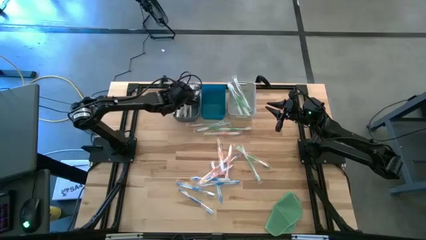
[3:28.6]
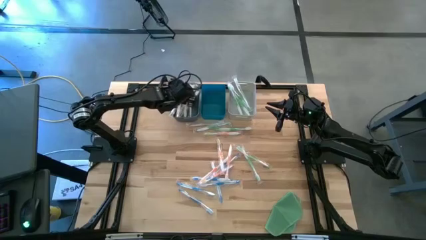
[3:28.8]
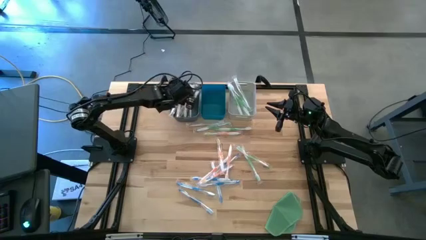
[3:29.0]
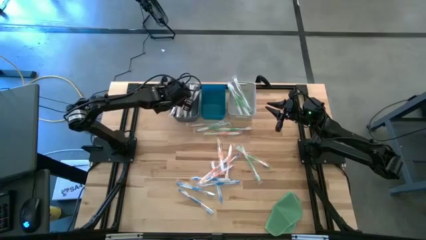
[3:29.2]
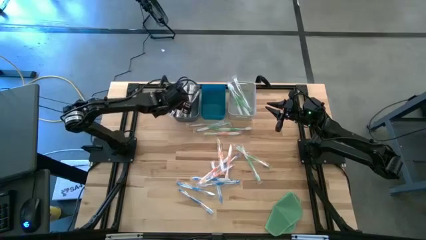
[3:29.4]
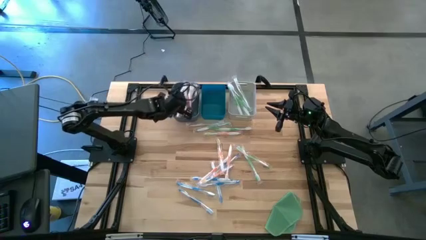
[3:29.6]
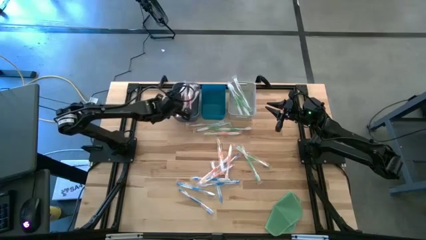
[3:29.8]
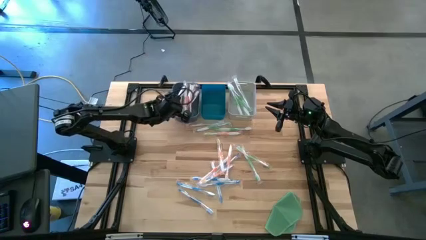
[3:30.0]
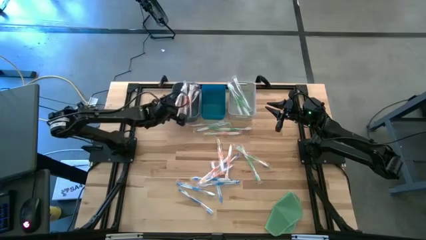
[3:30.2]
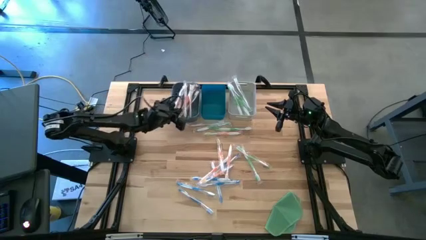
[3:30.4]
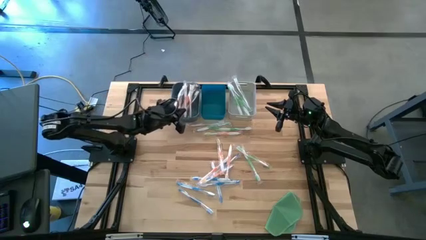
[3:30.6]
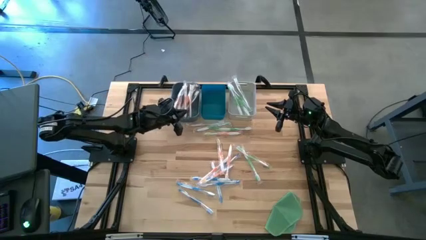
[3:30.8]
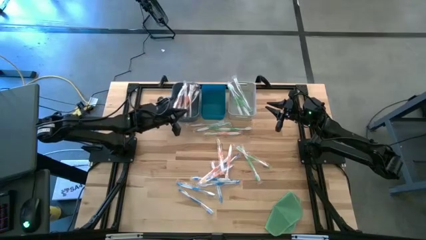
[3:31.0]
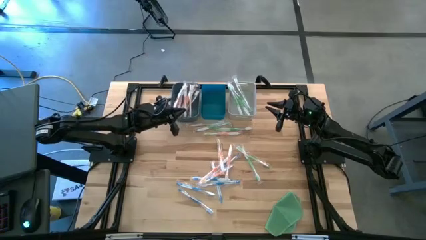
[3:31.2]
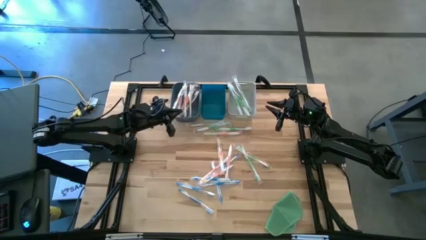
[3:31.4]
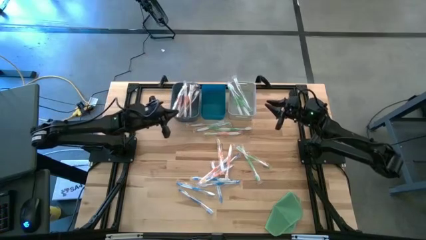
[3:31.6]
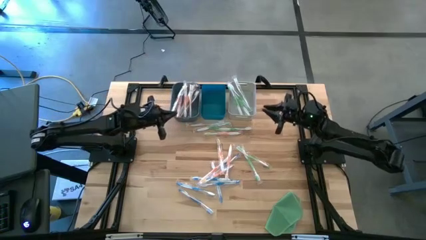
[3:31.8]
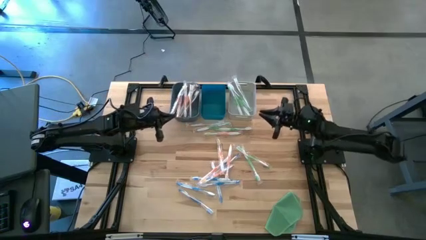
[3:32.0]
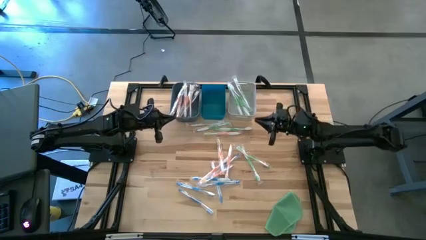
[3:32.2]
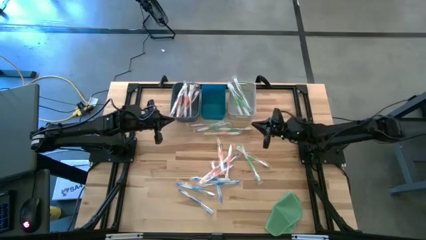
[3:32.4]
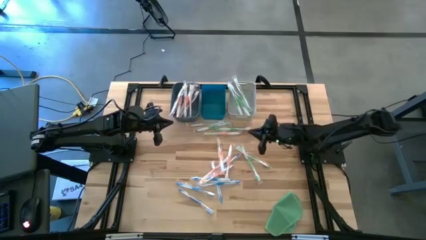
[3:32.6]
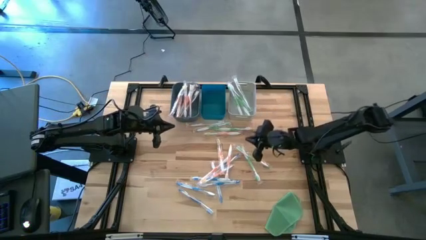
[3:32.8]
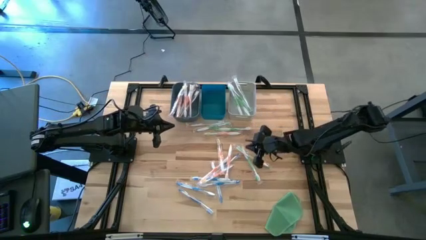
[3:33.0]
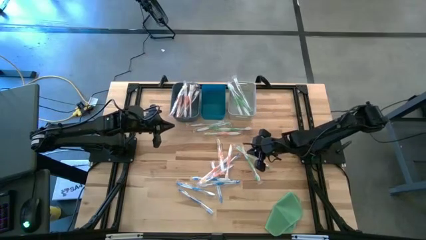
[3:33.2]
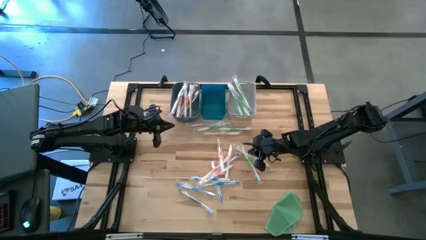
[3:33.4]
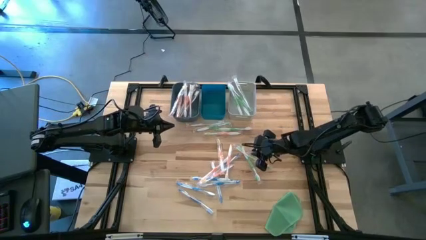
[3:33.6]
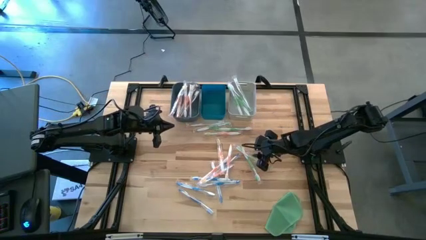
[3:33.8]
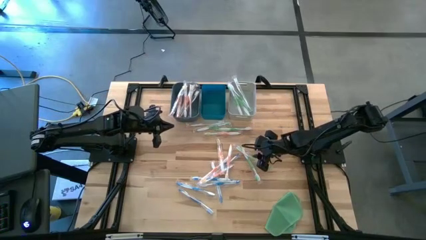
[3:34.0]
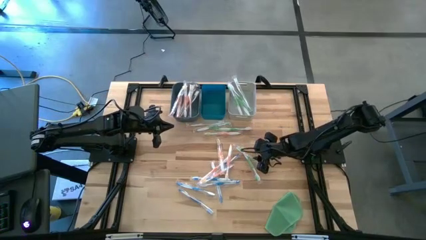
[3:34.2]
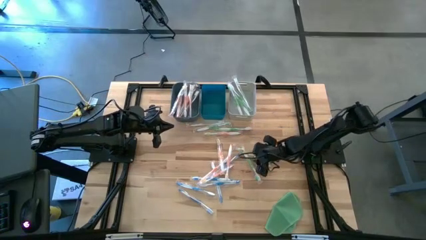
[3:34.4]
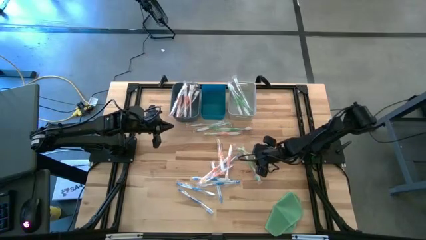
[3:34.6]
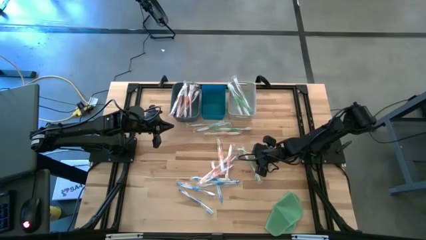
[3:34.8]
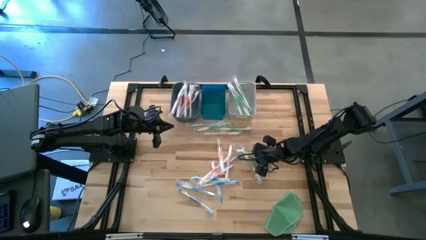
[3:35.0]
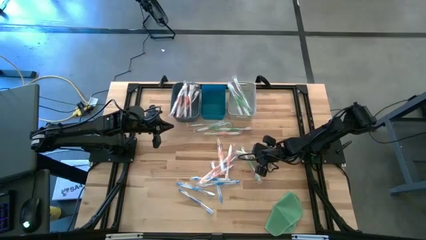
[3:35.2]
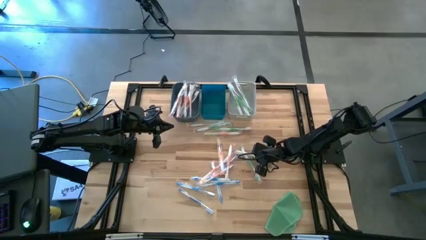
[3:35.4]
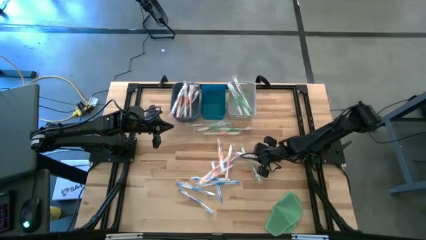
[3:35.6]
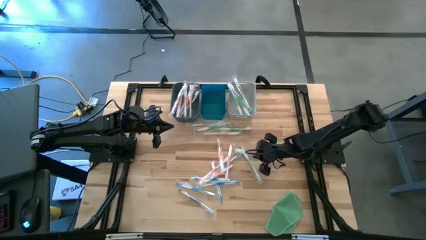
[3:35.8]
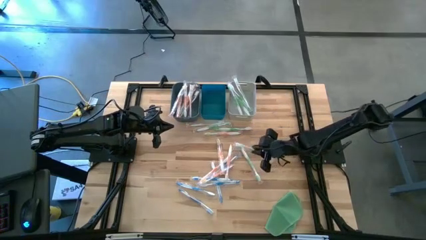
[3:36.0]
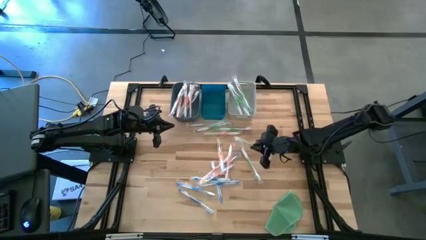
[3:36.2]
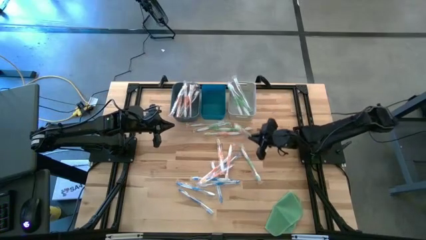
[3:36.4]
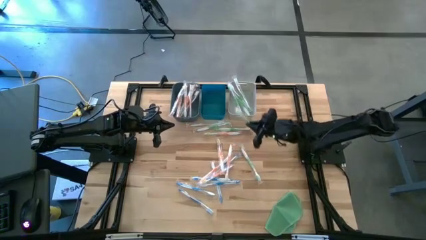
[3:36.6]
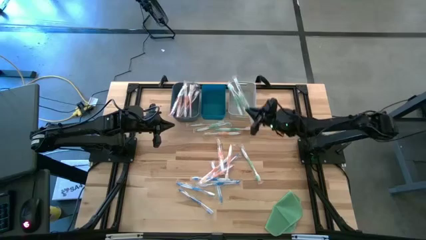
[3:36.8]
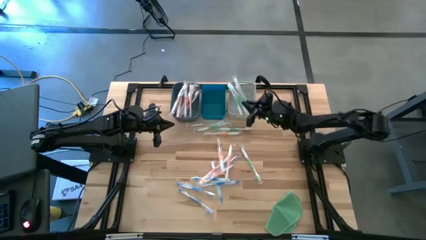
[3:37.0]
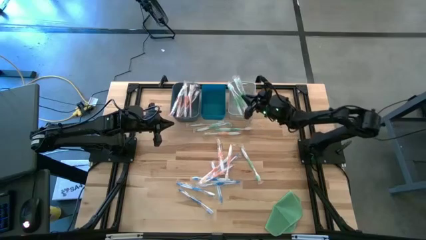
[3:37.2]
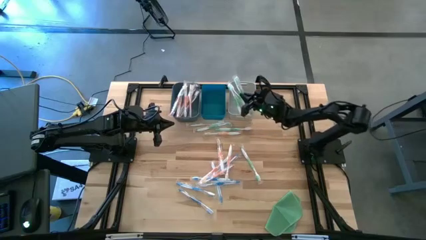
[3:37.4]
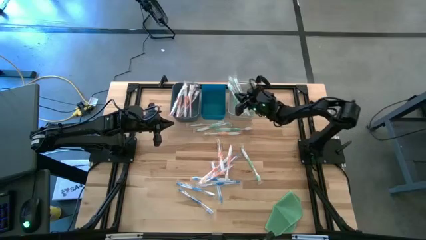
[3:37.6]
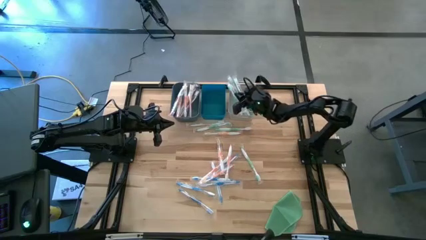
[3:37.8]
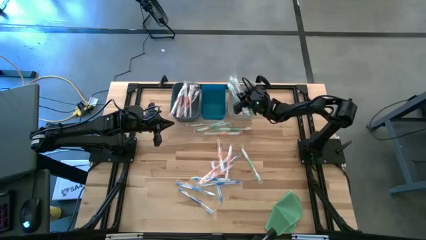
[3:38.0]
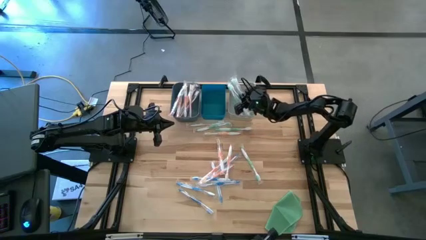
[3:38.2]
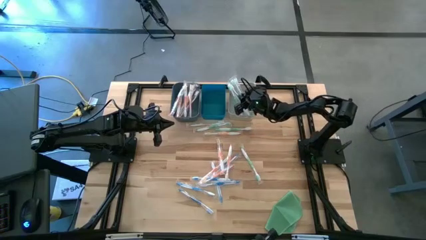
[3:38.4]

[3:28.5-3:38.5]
Task: Pick & Place Toothbrushes
Put the green toothbrush into the white bin

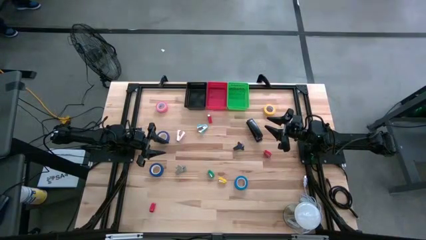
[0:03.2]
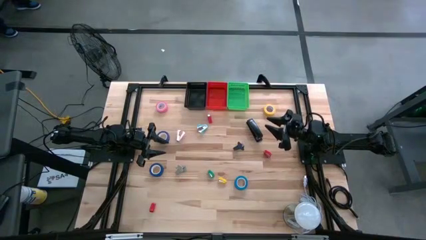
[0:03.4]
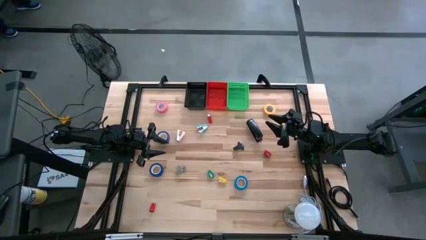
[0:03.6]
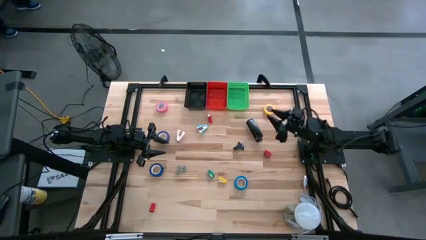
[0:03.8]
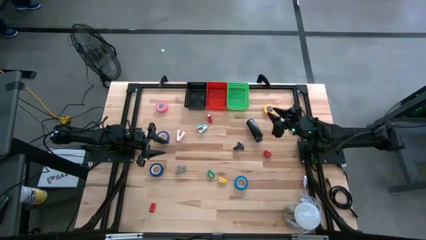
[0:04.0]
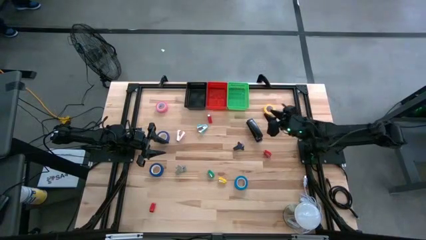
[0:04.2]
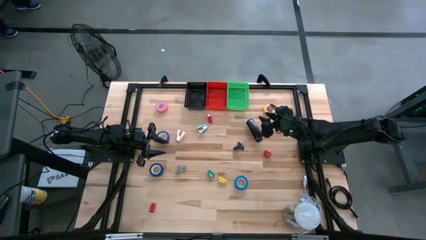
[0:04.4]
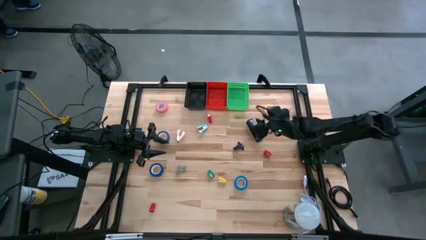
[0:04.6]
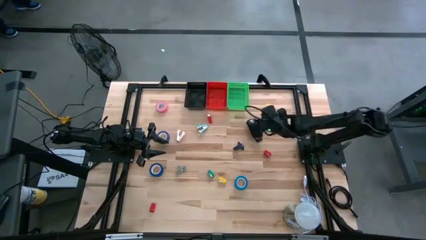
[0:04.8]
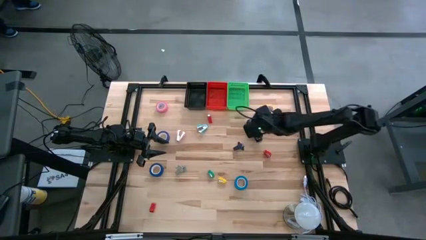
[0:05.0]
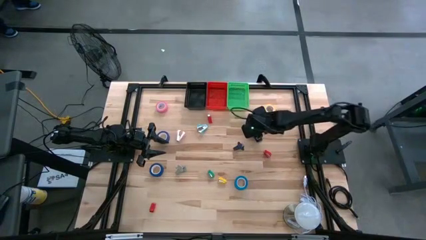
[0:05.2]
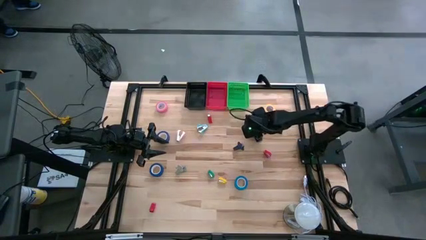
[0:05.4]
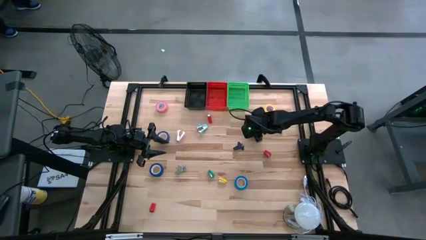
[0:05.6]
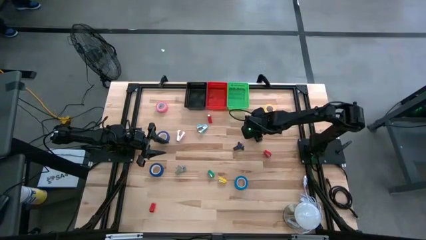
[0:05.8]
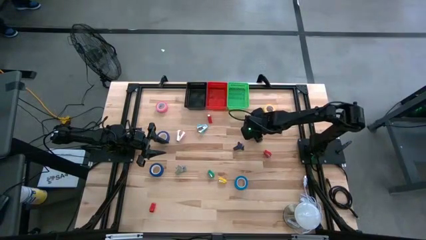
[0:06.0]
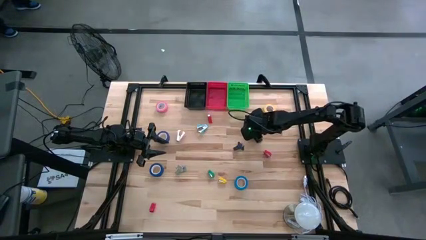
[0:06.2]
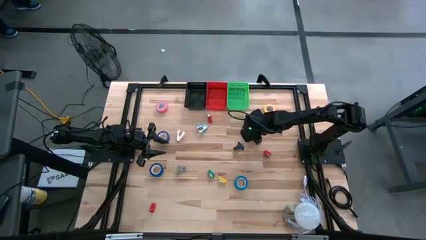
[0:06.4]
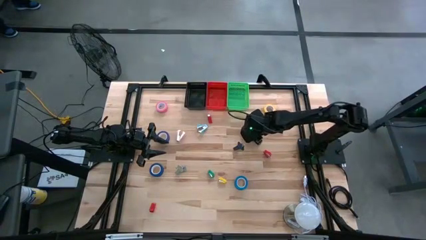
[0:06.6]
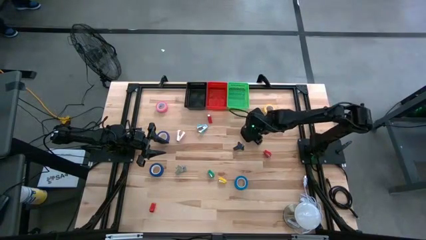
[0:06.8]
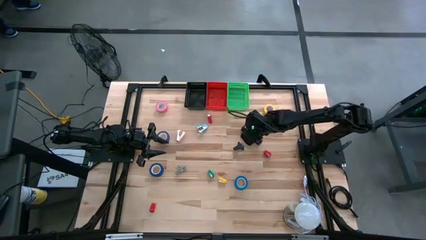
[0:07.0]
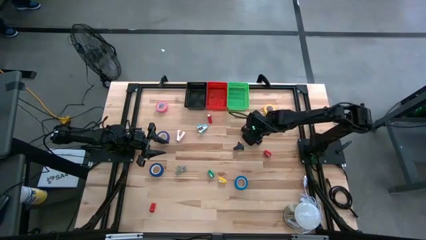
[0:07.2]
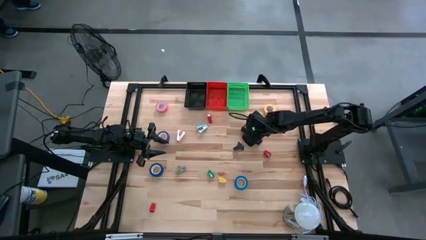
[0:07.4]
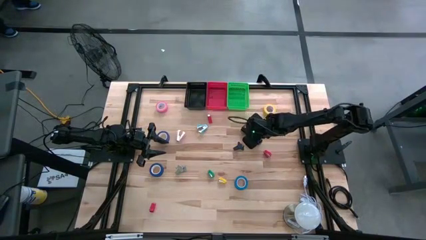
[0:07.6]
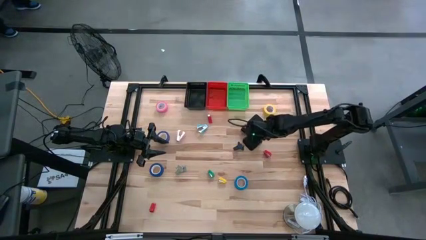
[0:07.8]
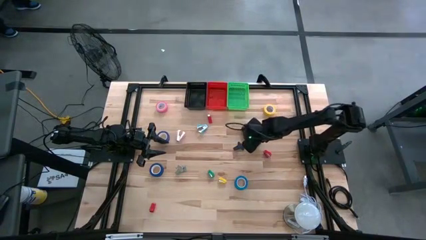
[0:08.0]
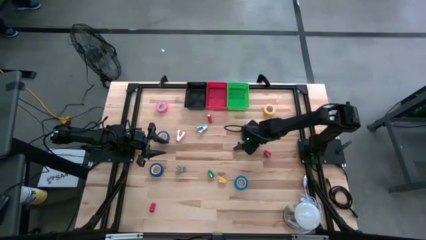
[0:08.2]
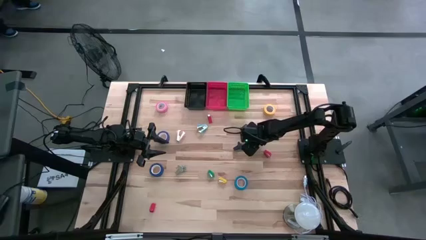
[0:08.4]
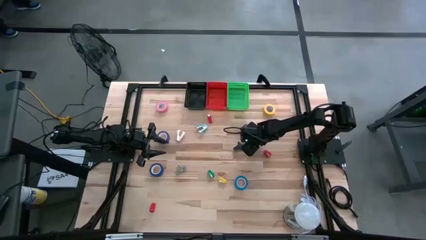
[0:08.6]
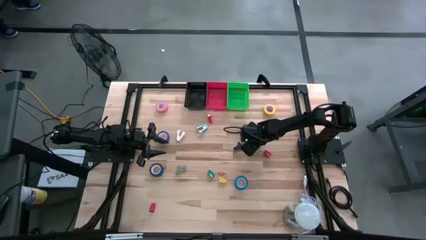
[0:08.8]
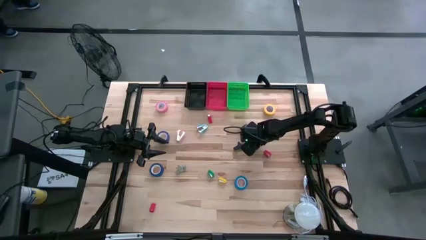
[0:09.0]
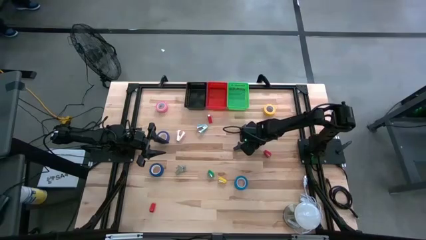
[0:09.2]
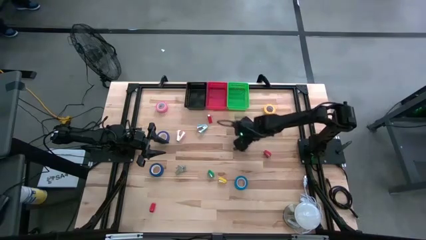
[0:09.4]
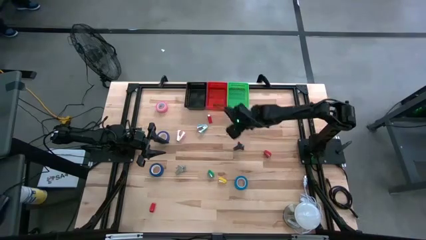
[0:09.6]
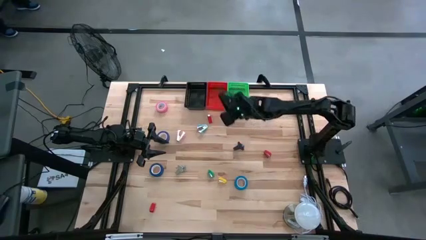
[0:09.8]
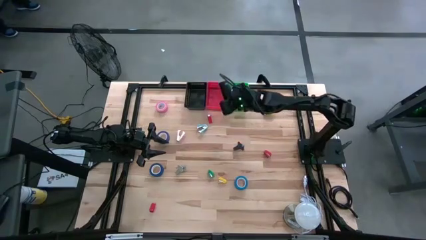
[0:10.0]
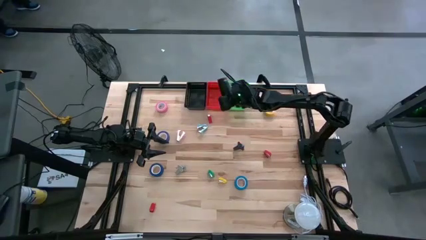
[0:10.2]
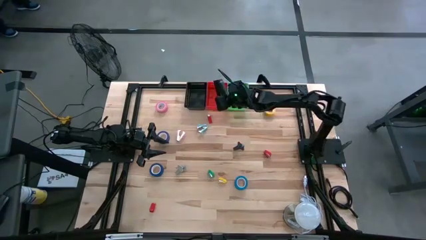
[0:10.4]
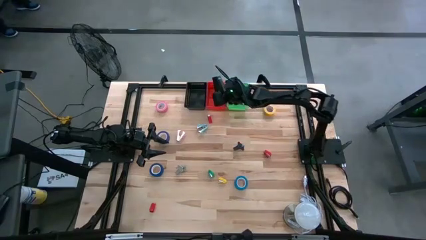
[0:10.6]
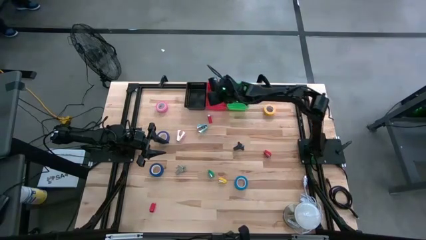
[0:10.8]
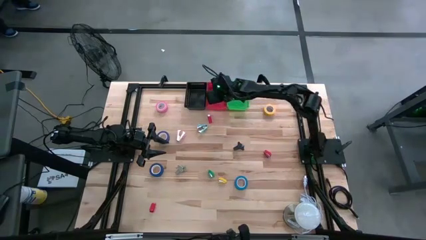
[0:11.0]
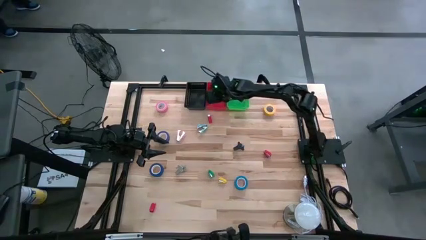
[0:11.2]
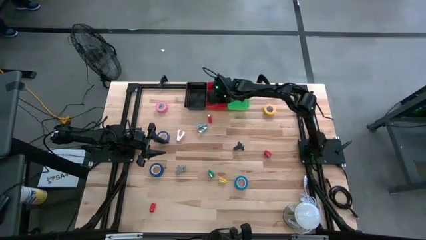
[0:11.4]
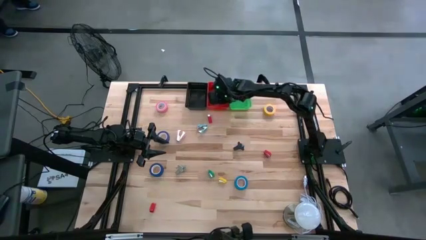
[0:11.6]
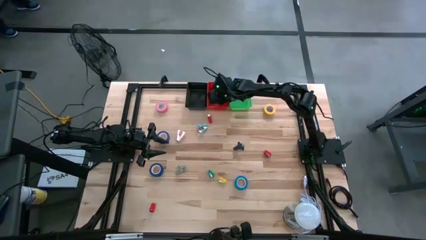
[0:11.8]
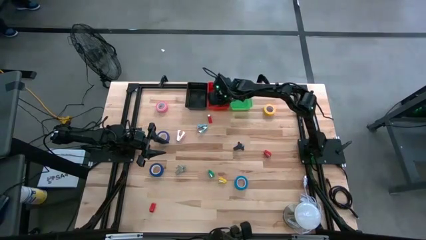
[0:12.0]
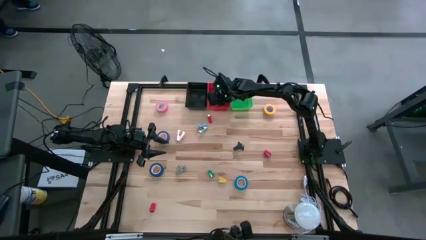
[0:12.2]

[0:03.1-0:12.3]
Task: Pick and place Stapler, Stapler remover, tape
Put the large black stapler into the red bin
